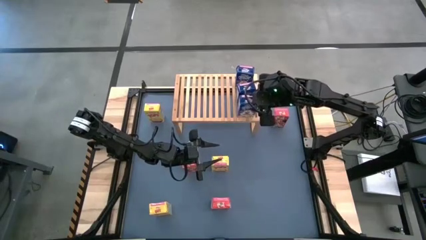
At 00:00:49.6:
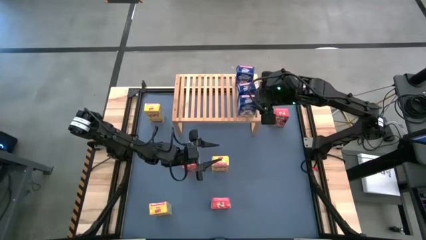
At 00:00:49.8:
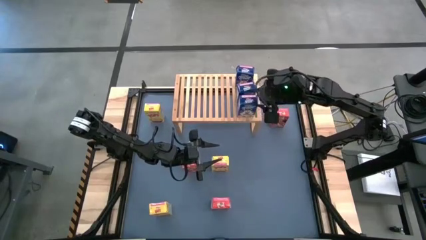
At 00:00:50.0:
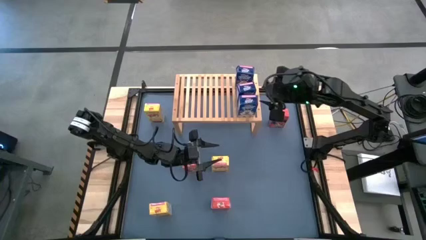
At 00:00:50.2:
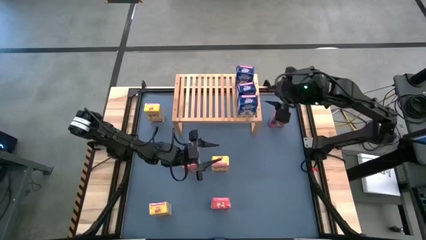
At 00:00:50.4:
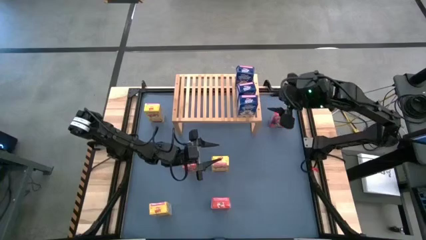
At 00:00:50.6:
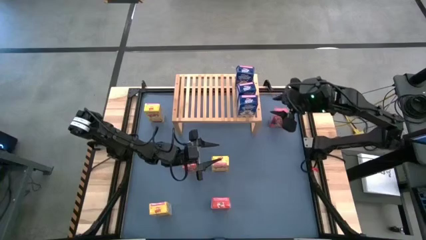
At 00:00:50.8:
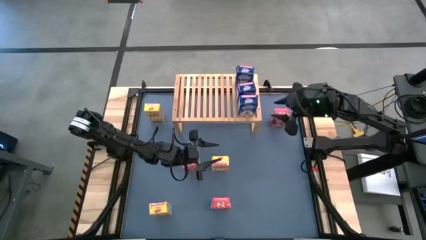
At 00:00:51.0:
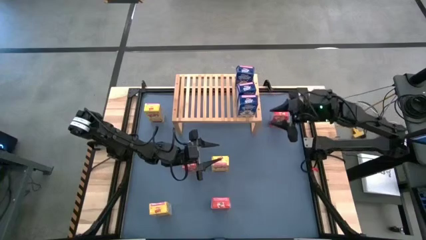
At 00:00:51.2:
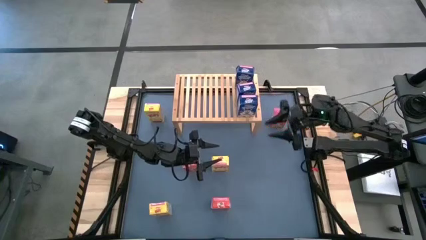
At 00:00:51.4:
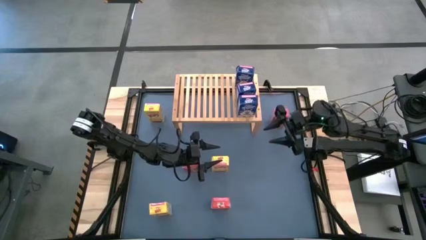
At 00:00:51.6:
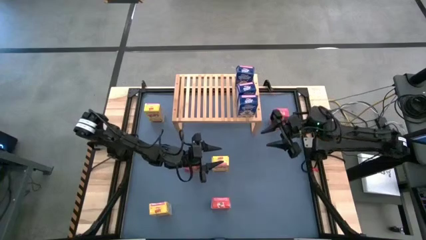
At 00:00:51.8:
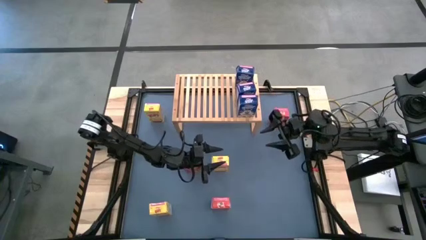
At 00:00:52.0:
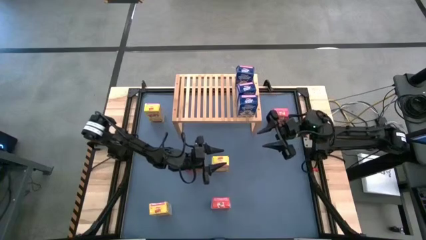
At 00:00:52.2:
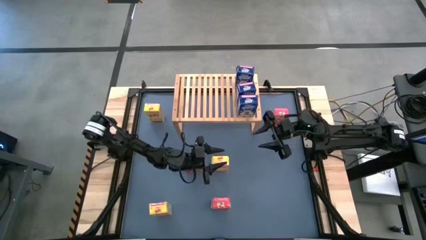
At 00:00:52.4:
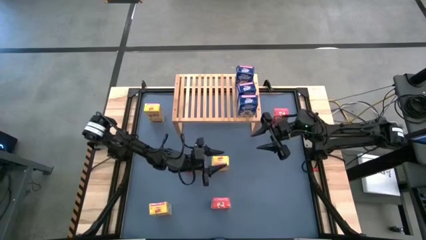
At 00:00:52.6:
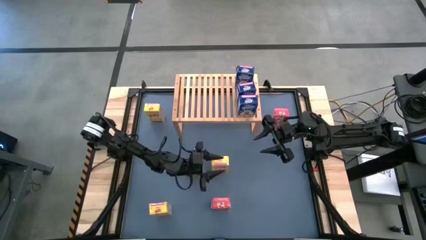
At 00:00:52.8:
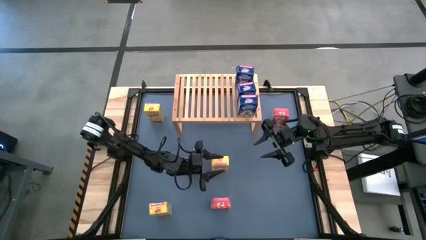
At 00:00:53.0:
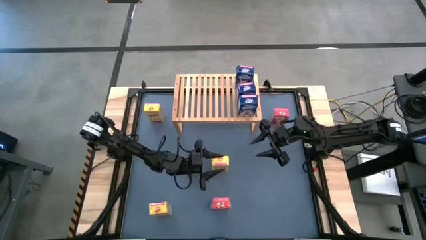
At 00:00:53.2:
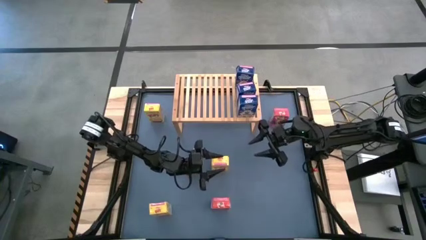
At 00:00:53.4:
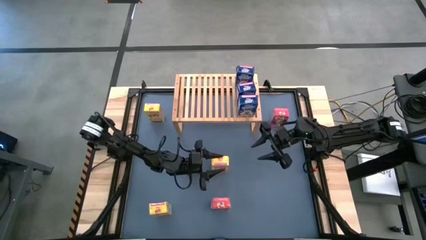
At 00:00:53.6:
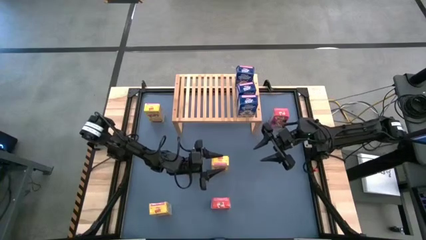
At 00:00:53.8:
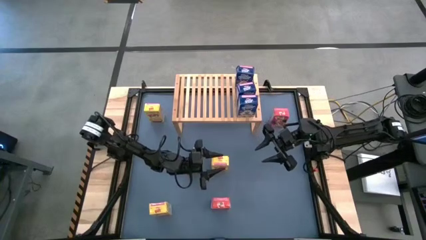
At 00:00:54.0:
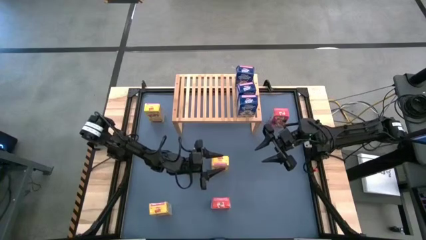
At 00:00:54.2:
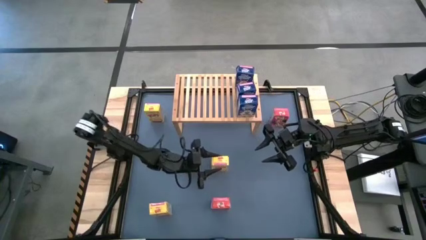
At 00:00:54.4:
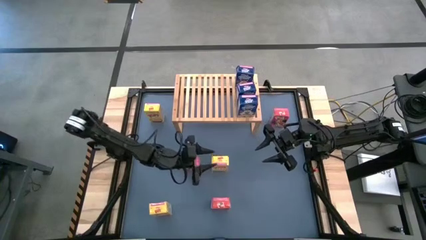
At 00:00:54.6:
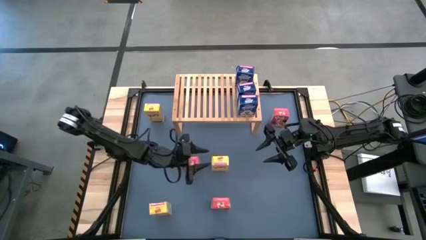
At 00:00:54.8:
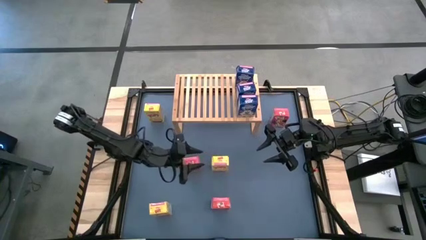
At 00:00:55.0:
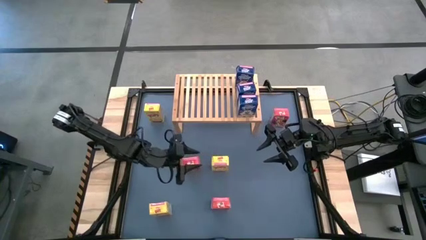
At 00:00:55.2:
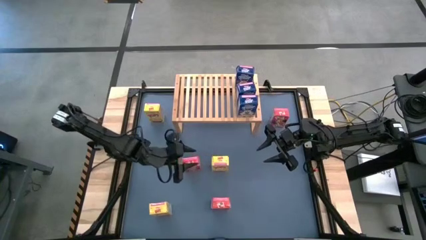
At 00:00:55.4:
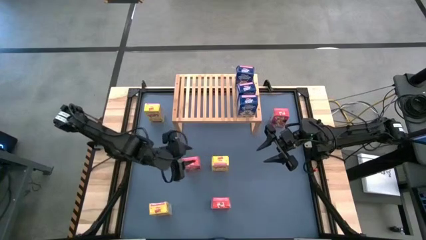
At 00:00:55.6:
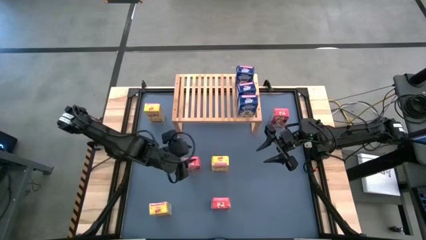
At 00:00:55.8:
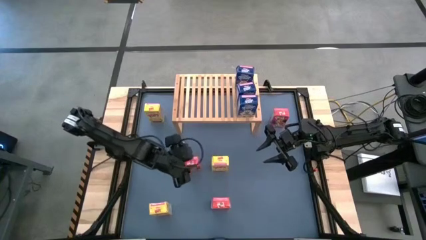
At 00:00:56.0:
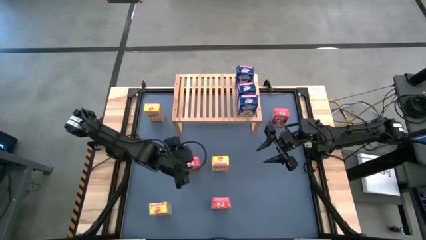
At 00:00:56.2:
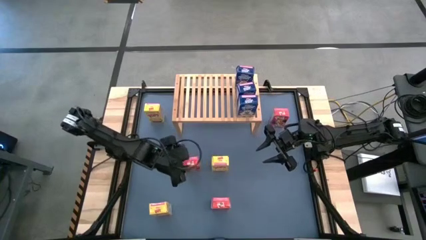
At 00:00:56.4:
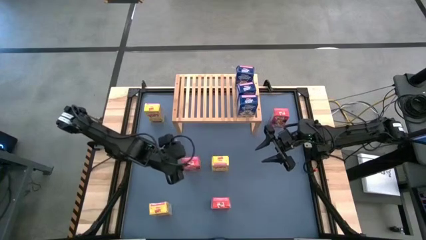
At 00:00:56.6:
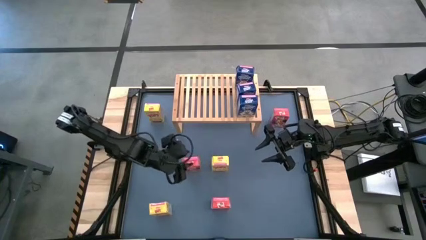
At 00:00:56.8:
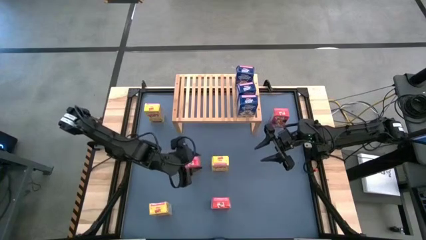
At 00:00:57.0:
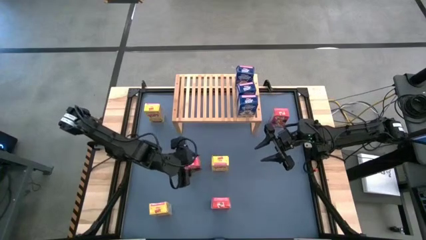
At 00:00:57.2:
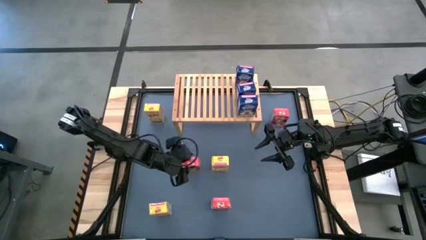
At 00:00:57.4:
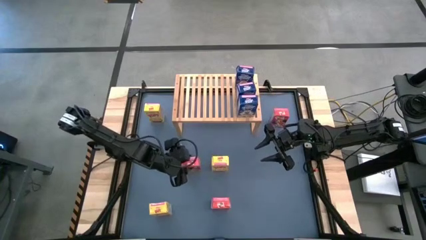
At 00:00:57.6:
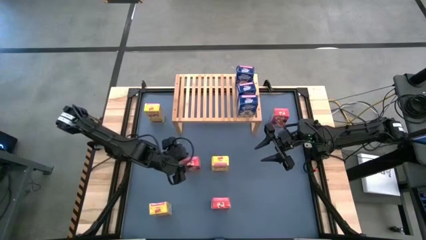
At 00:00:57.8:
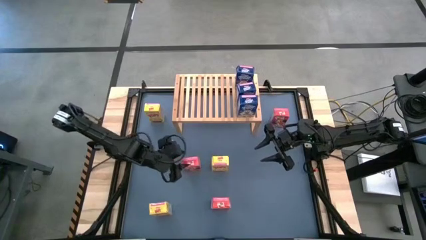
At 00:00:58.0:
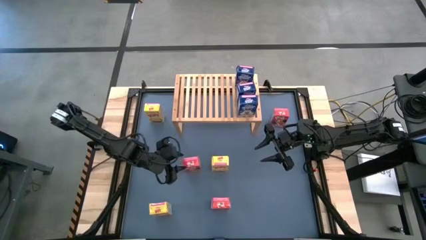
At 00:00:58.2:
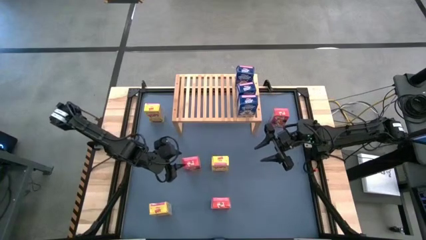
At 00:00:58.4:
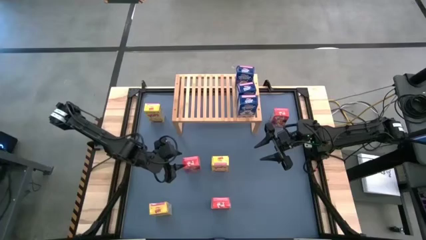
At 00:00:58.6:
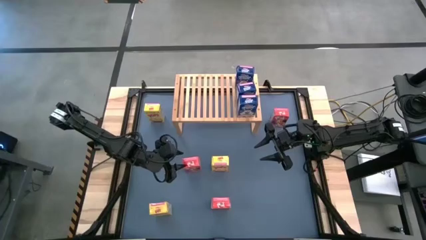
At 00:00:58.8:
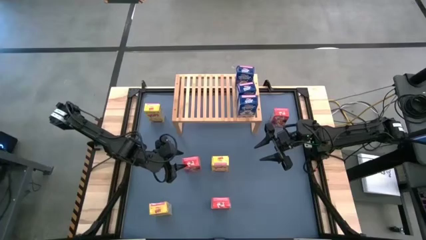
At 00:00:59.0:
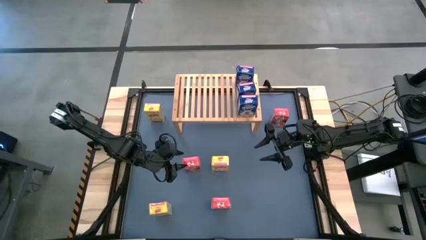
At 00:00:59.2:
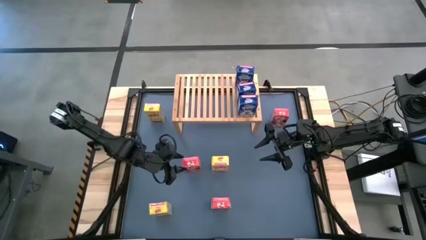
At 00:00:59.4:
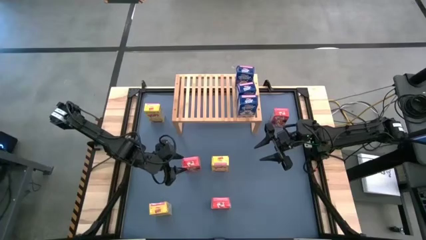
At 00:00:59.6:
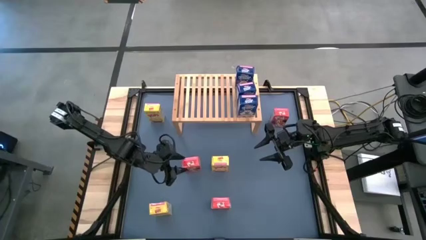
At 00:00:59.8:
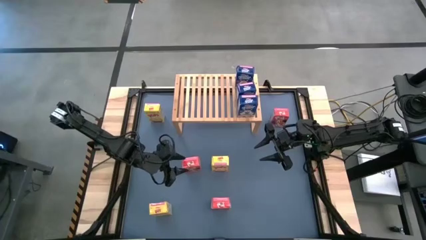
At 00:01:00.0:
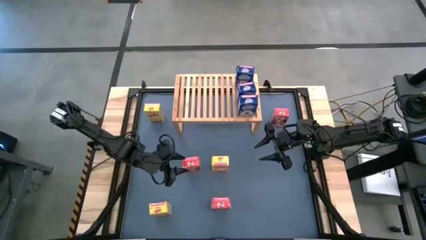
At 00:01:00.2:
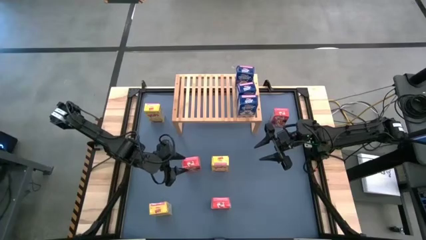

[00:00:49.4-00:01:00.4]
Task: Stack cereal on shelf
Put the middle red cereal box on the shelf
